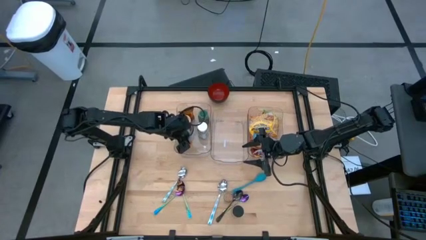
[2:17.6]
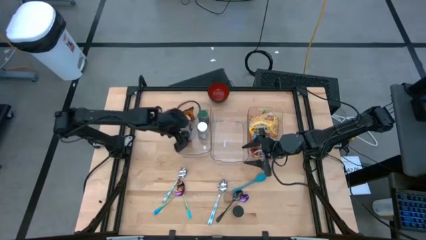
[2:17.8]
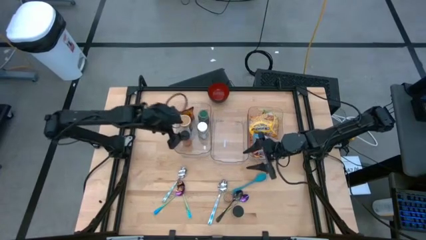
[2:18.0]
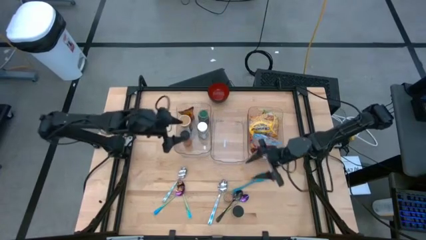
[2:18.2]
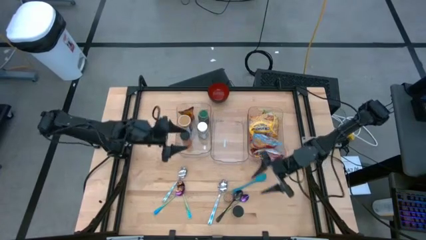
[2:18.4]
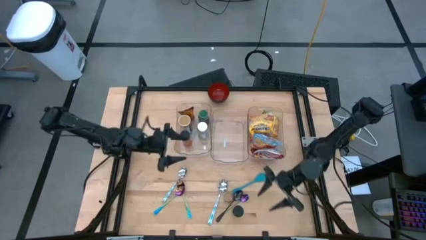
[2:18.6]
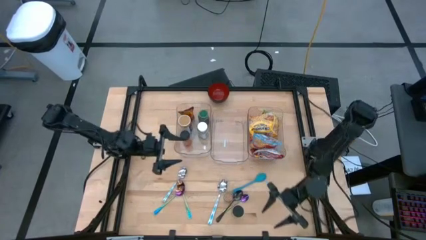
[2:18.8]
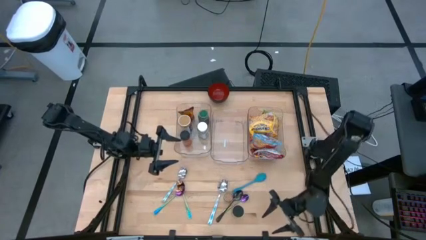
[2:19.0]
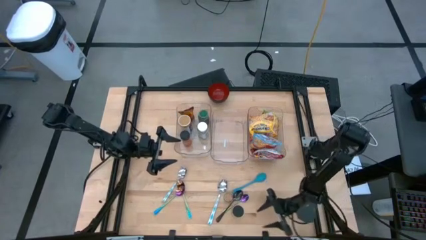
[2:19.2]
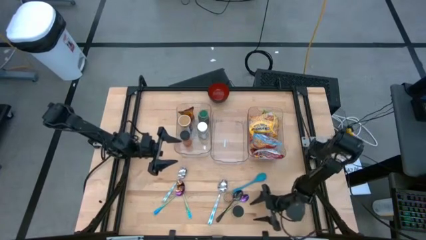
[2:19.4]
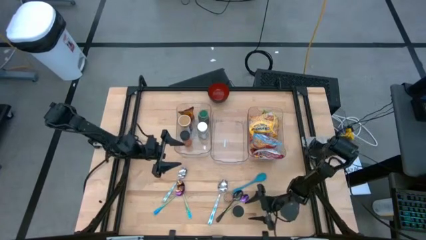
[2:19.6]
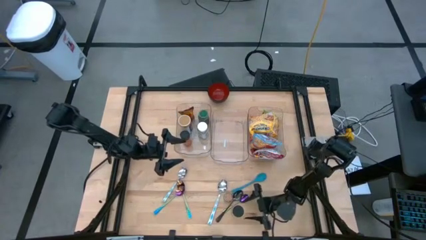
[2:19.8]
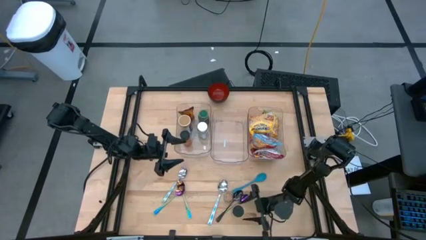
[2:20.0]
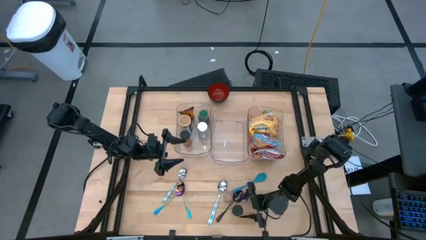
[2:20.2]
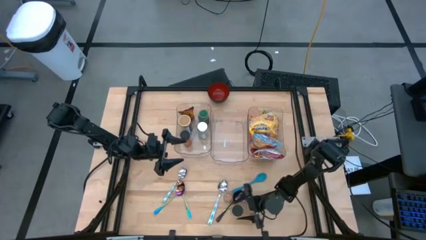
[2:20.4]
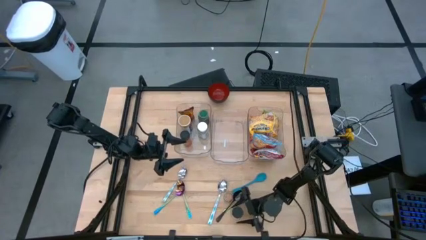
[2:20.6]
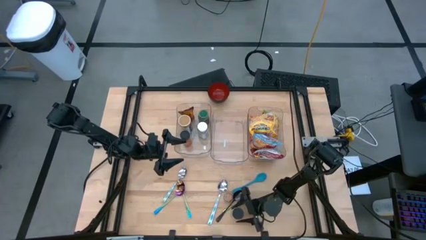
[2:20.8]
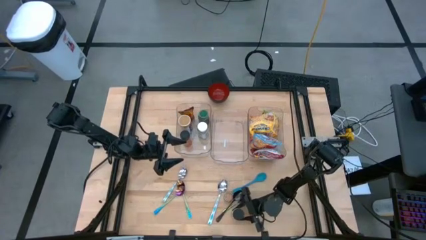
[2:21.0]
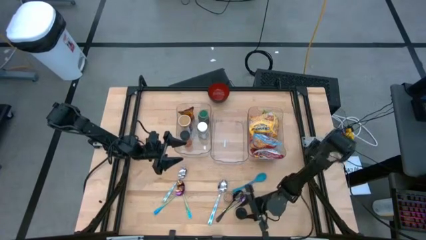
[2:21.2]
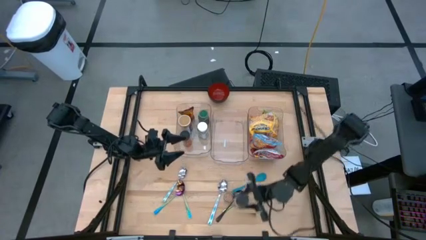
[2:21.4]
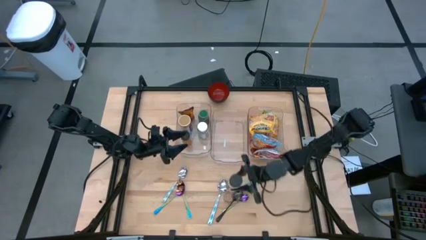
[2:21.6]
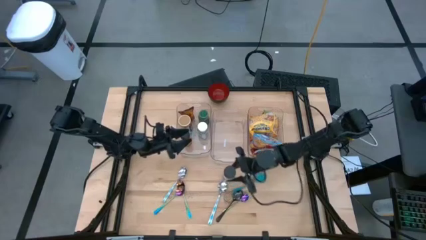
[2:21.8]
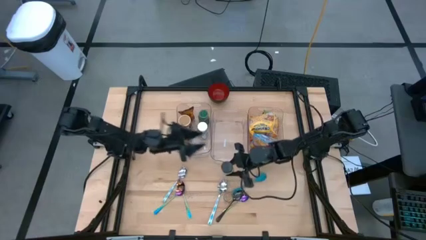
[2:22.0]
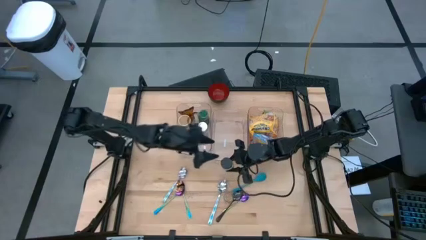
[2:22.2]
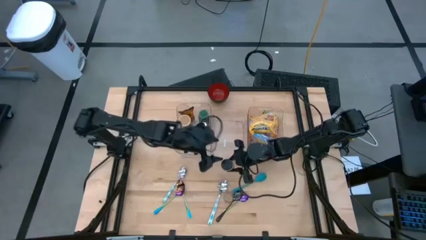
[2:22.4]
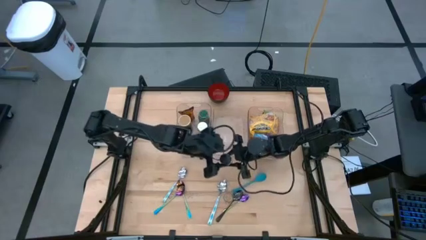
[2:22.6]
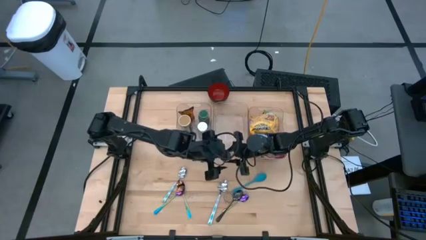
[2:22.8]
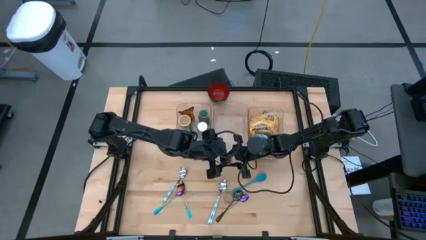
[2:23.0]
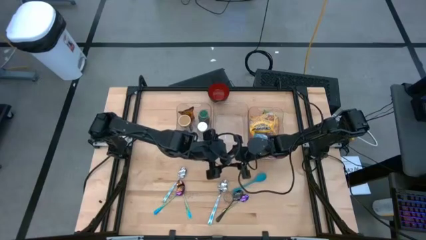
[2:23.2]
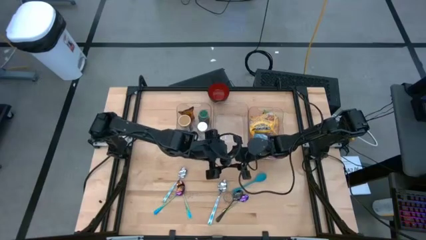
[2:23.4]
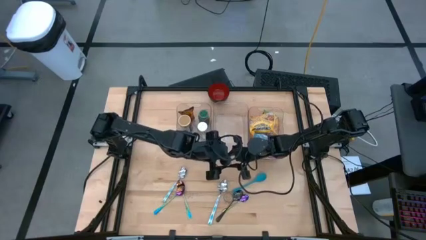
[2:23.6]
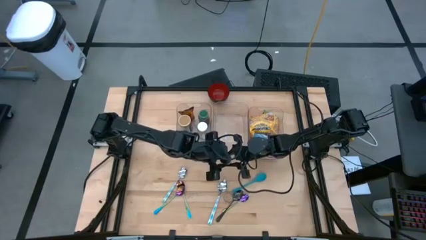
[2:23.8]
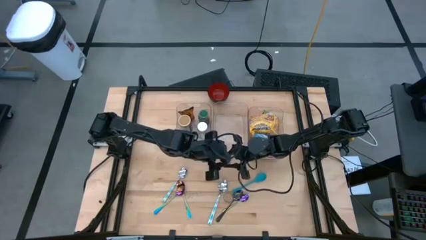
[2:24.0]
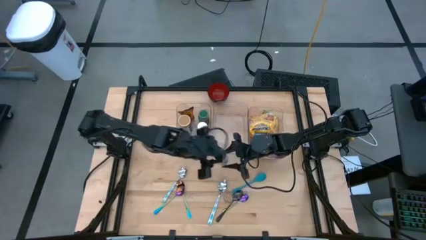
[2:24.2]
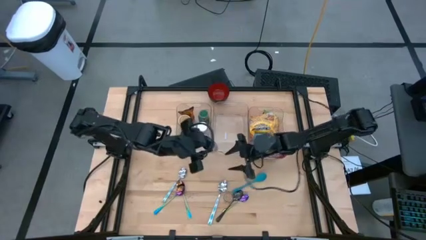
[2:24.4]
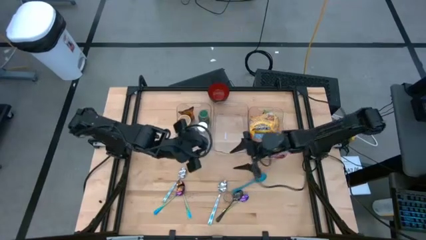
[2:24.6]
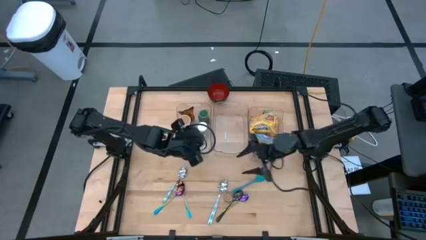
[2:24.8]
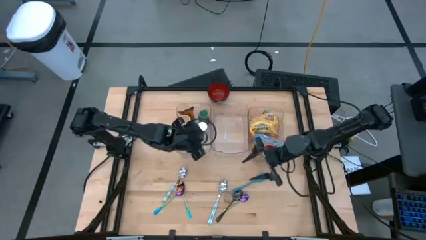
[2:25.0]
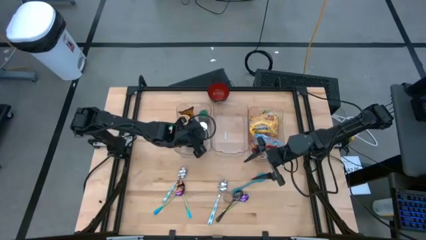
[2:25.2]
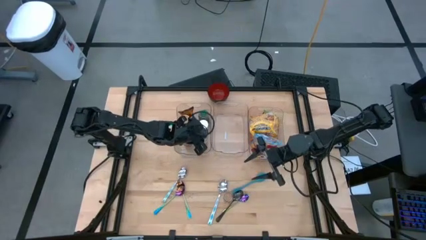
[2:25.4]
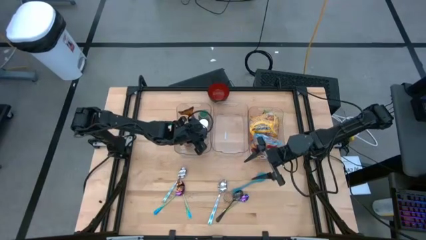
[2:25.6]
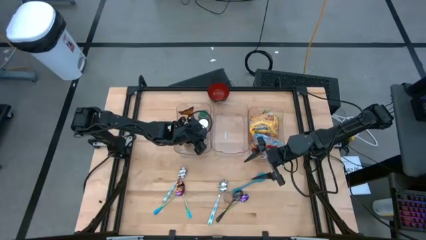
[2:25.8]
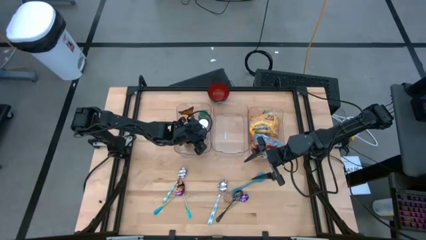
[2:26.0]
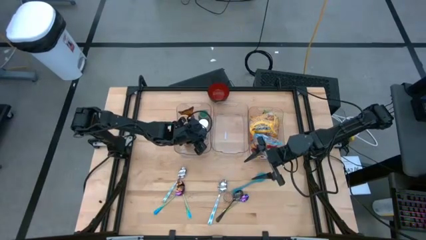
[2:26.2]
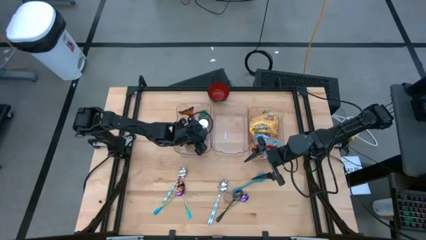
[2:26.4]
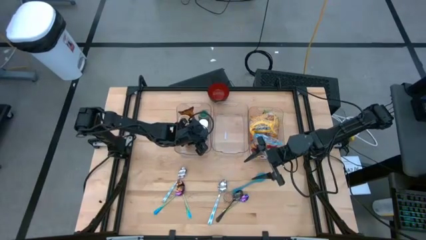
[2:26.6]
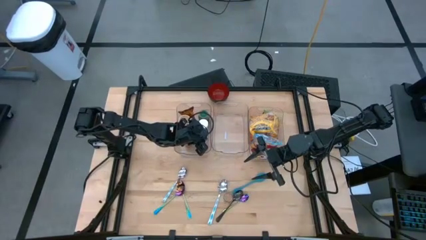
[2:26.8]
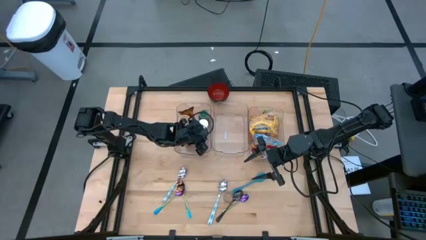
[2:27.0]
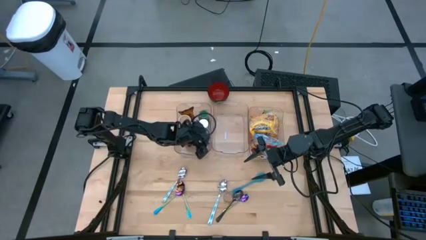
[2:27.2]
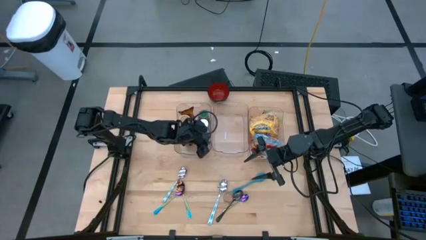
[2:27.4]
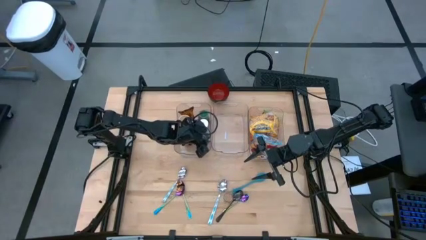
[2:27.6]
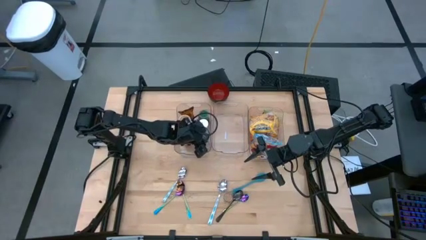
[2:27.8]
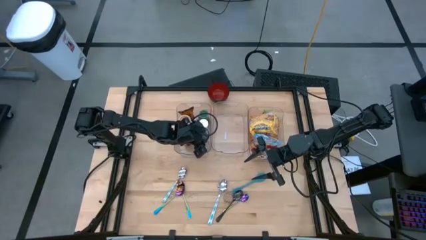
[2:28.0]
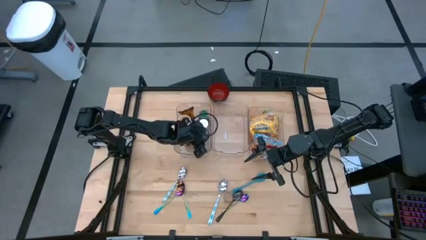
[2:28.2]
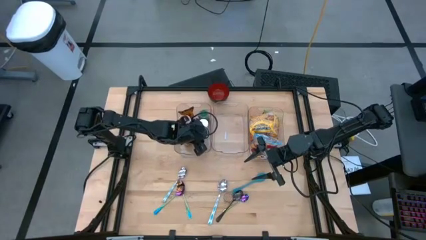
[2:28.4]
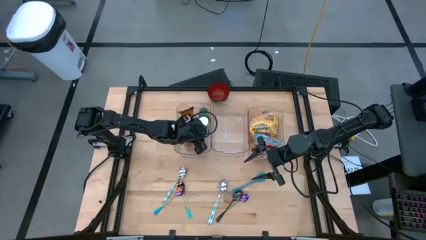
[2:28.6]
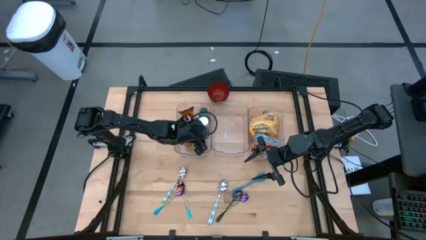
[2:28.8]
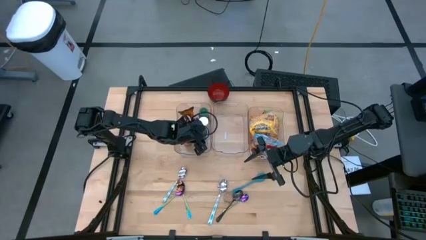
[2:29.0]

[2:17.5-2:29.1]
Task: Pick & Place Food Item
Put the purple seasoning bottle into the left transparent bin
